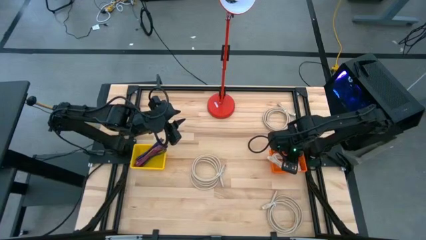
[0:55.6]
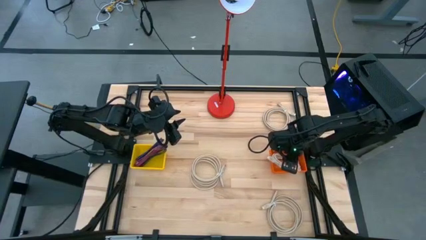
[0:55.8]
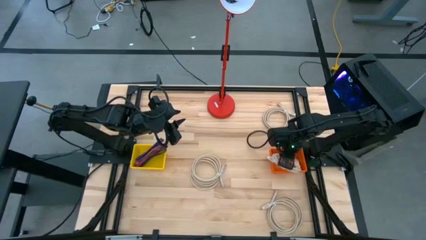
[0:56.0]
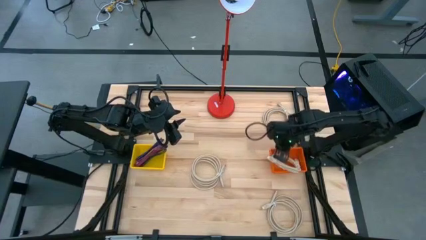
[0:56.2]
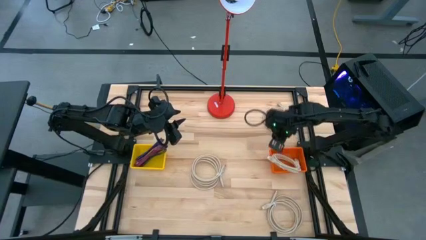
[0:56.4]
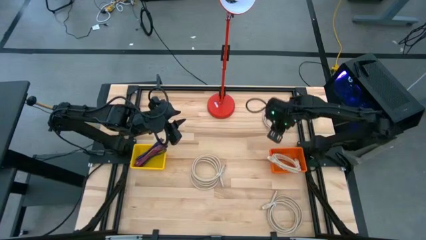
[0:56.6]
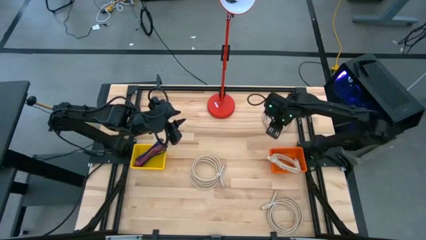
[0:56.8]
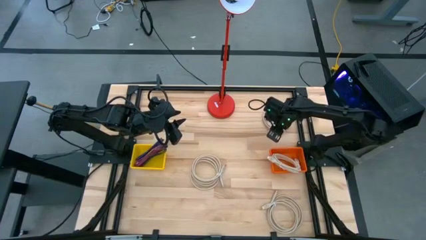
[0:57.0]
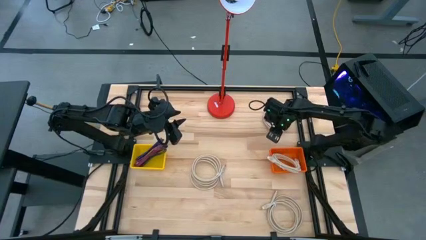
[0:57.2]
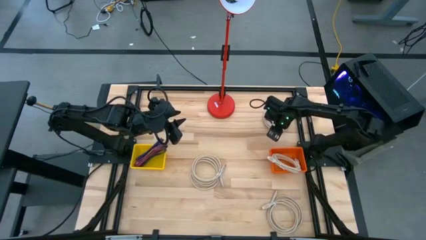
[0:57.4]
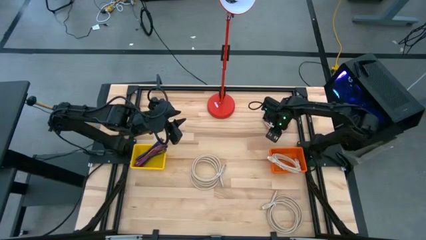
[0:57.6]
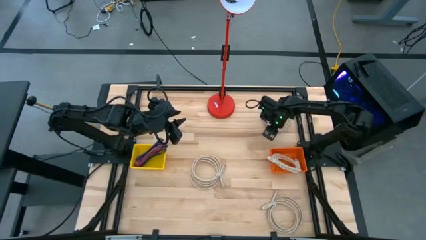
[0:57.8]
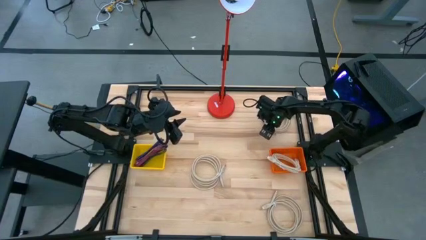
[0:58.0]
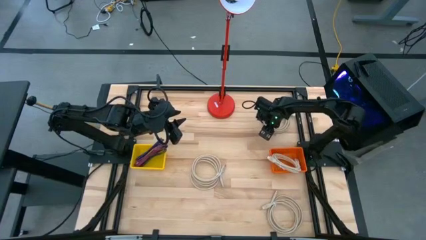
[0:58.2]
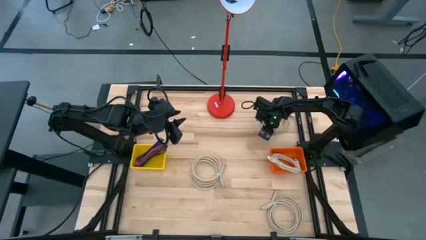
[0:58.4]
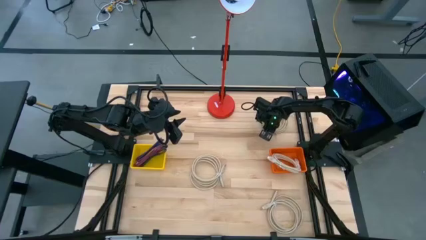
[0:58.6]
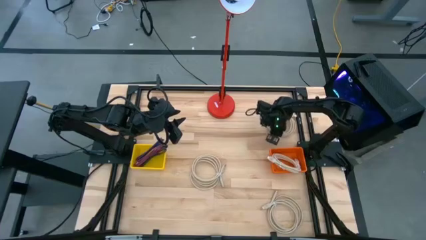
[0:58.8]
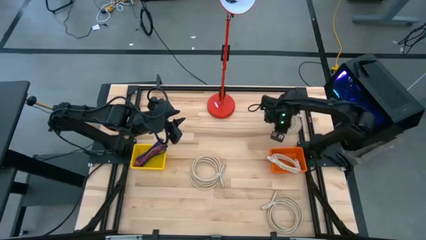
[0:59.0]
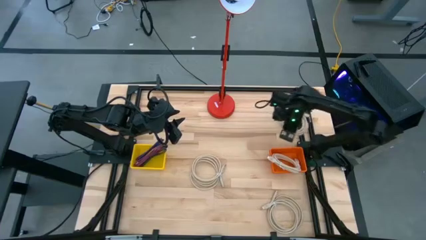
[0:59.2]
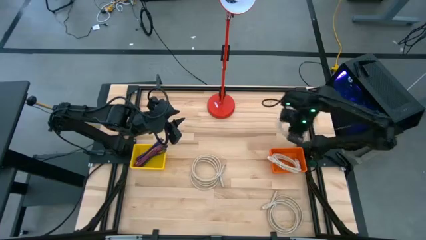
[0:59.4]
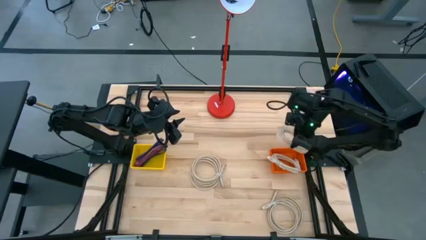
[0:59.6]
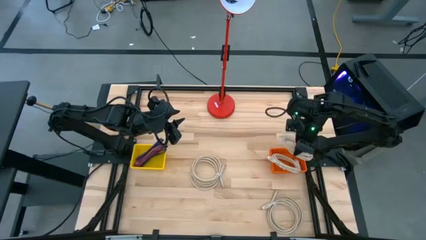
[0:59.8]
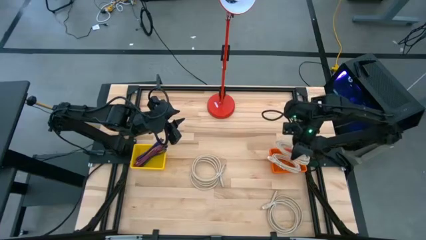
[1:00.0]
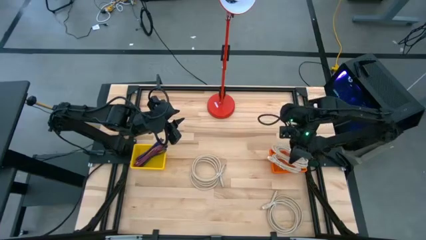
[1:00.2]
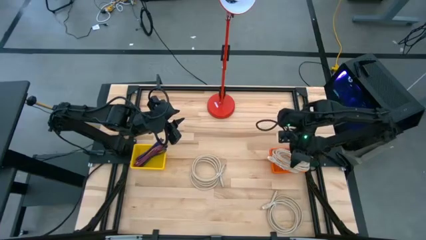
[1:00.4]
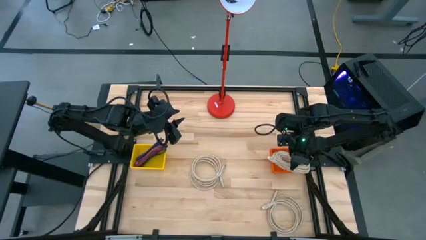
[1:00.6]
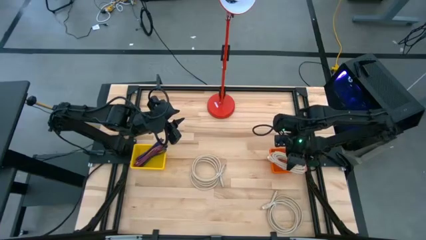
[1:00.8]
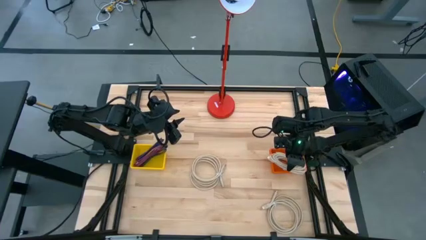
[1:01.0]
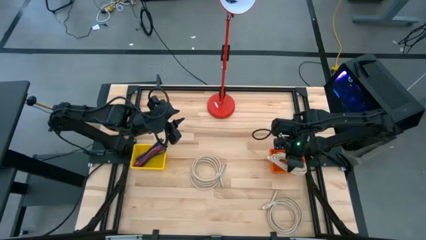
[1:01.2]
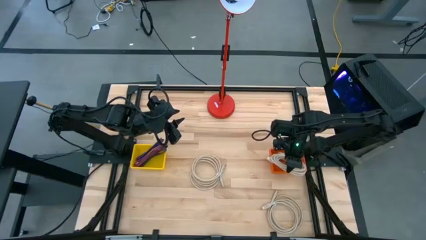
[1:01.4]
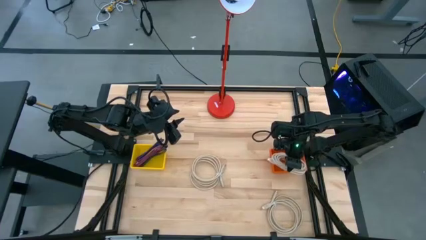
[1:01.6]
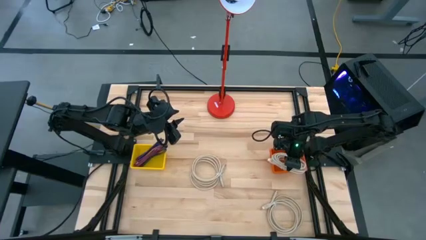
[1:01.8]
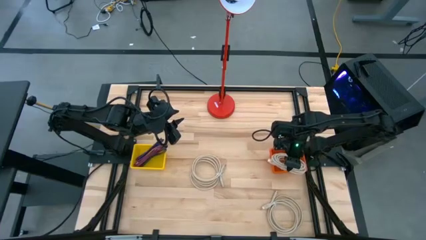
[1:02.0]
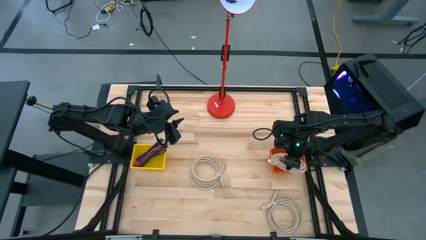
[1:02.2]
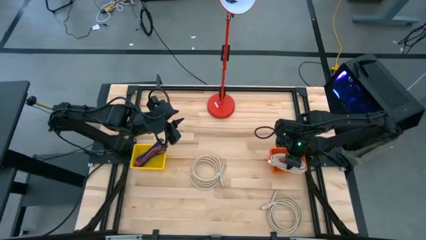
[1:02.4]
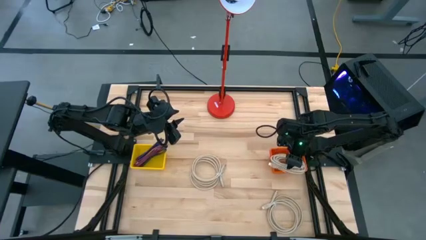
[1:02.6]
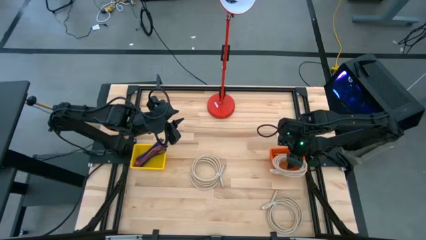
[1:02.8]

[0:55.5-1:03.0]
Task: Pick & Place USB Port
Put the brown HDMI cable into the orange bin

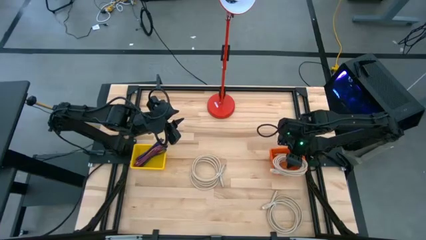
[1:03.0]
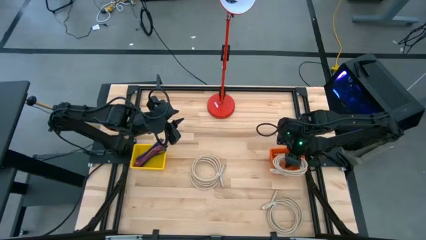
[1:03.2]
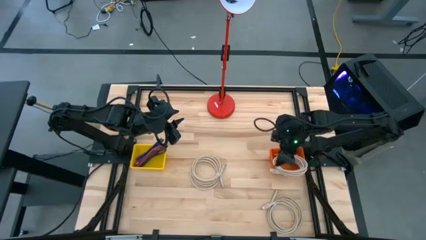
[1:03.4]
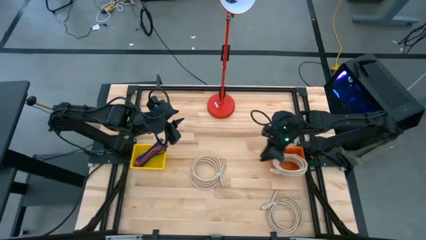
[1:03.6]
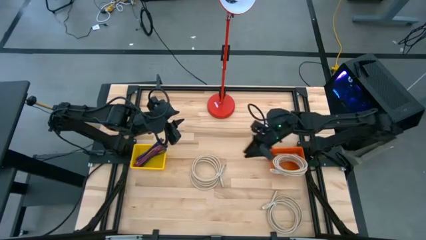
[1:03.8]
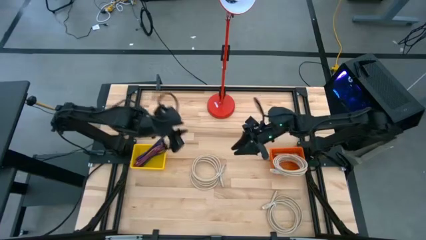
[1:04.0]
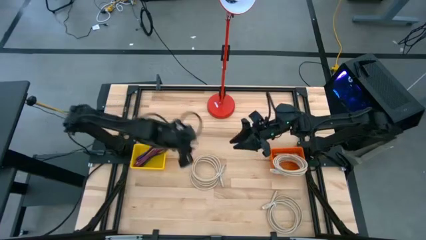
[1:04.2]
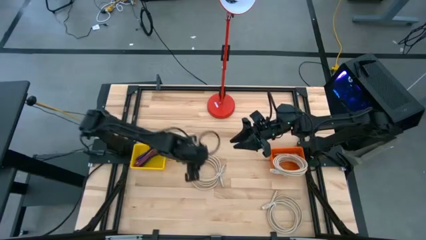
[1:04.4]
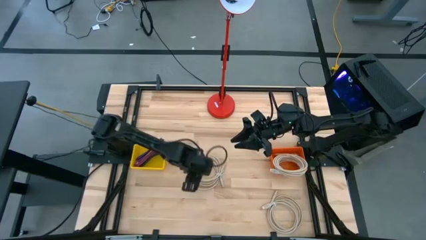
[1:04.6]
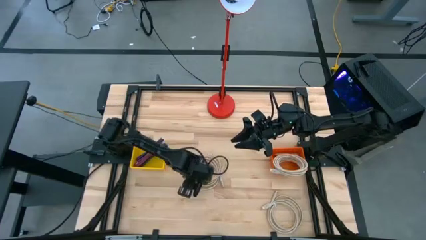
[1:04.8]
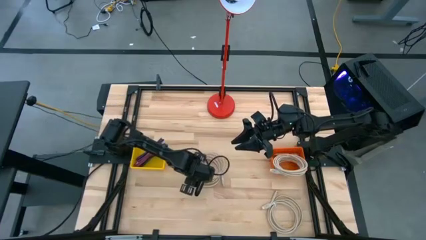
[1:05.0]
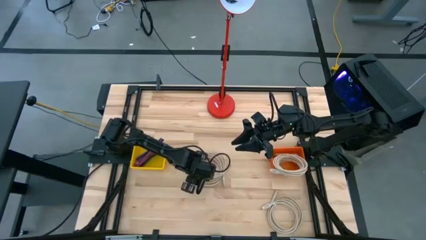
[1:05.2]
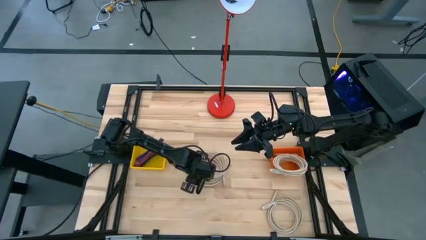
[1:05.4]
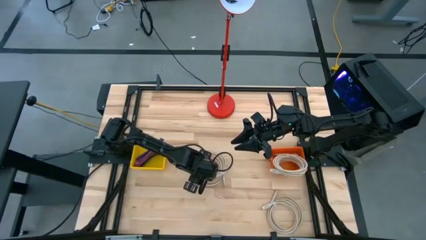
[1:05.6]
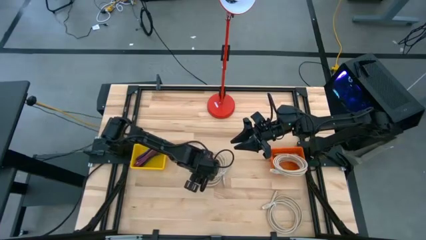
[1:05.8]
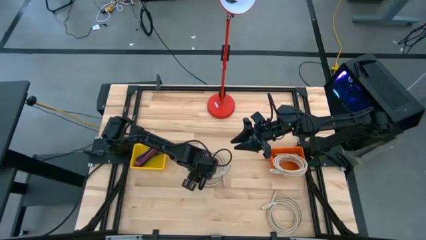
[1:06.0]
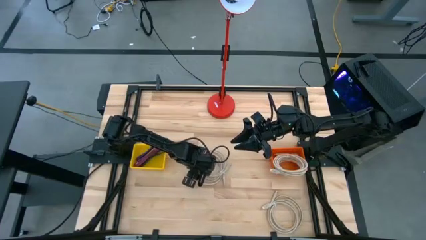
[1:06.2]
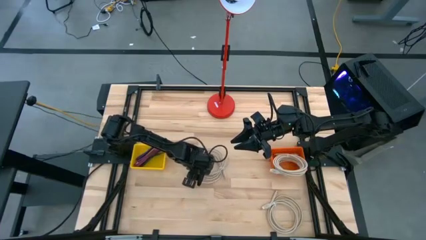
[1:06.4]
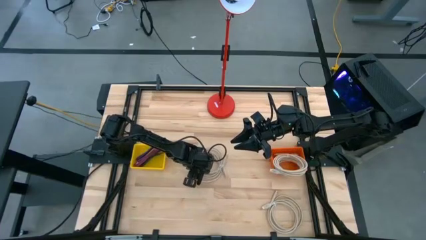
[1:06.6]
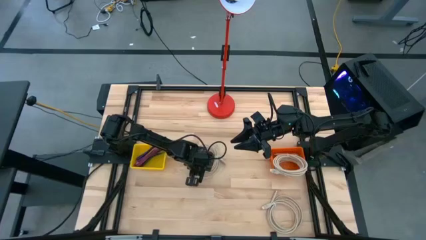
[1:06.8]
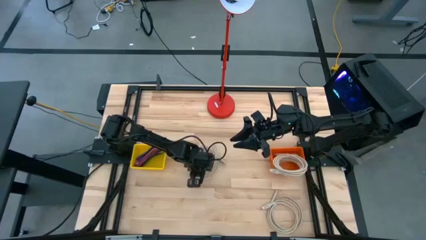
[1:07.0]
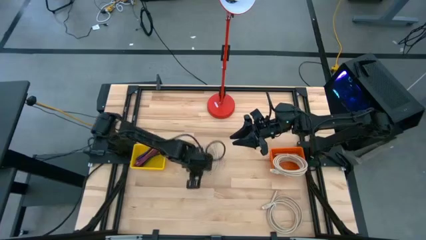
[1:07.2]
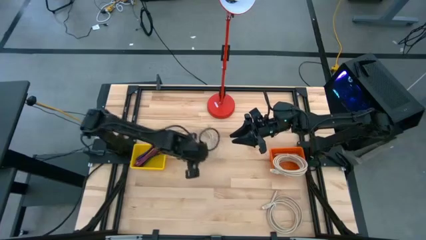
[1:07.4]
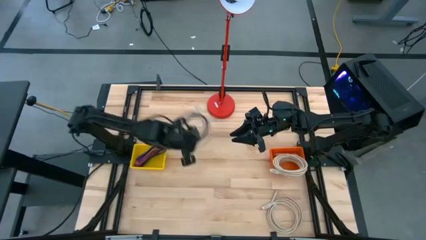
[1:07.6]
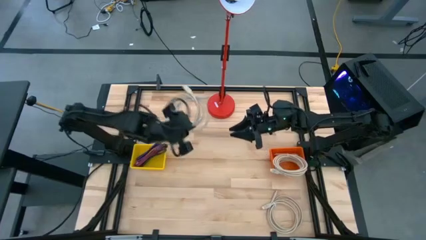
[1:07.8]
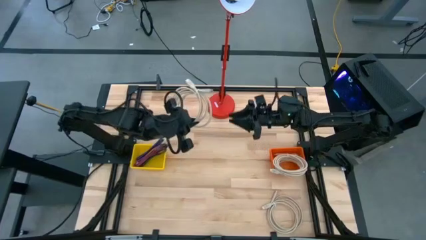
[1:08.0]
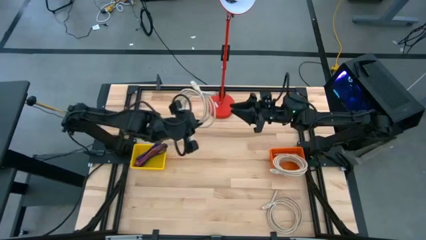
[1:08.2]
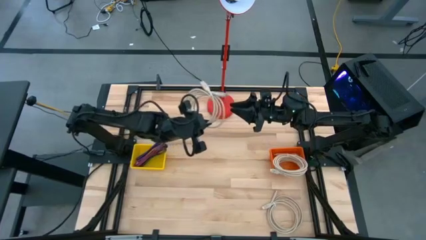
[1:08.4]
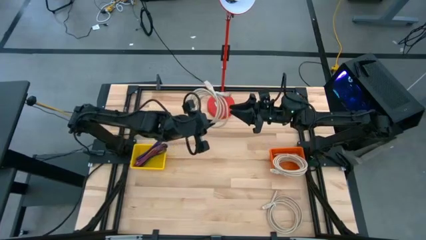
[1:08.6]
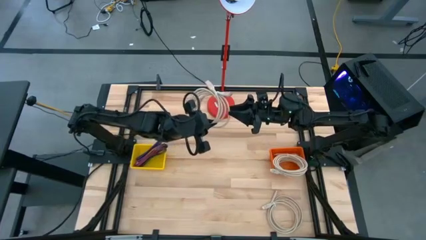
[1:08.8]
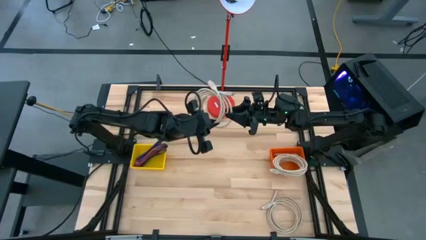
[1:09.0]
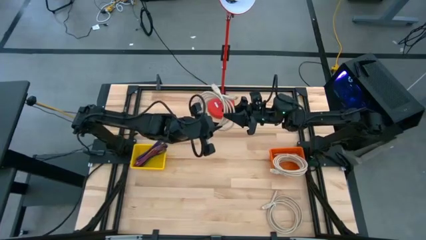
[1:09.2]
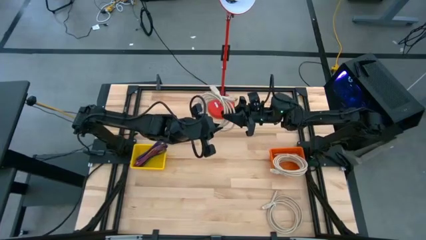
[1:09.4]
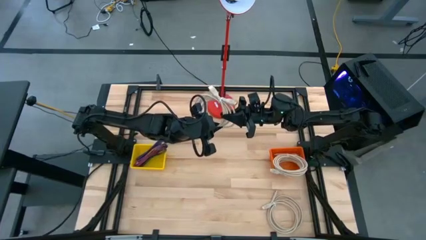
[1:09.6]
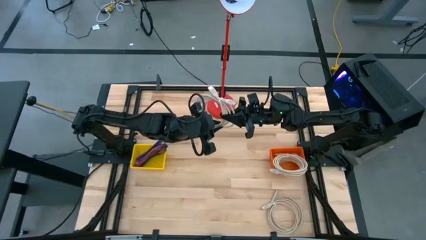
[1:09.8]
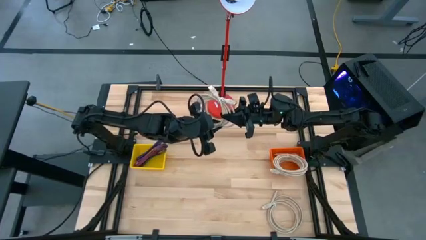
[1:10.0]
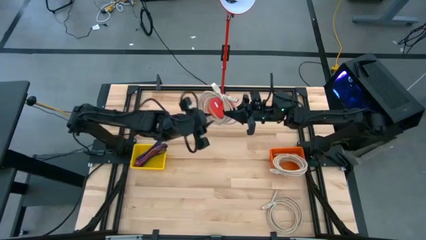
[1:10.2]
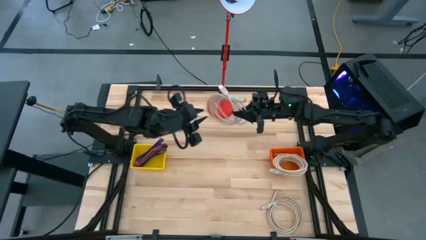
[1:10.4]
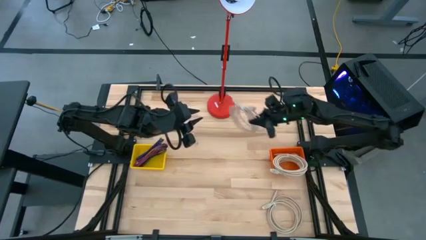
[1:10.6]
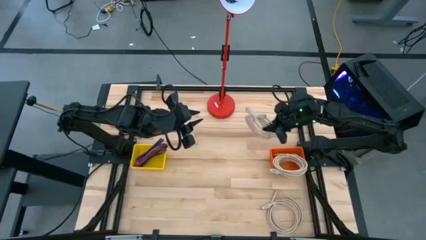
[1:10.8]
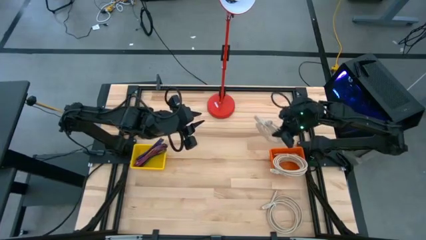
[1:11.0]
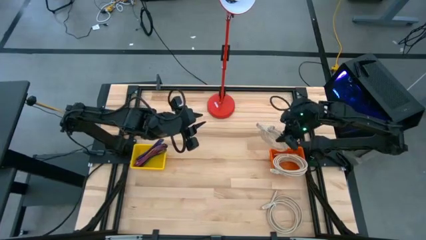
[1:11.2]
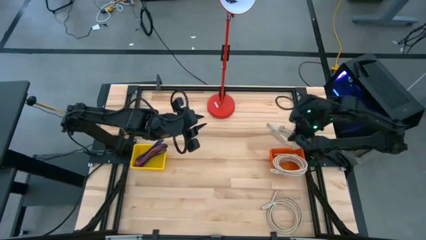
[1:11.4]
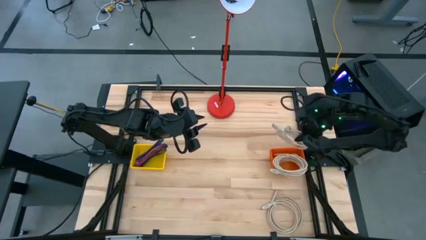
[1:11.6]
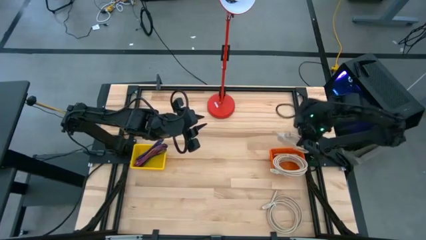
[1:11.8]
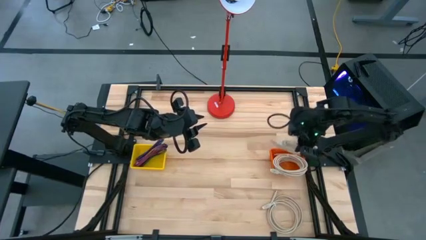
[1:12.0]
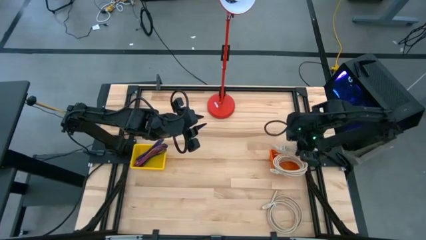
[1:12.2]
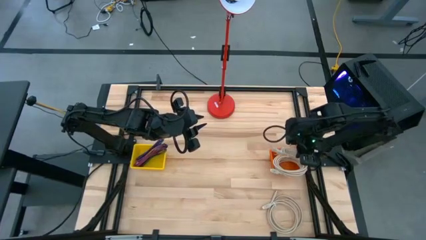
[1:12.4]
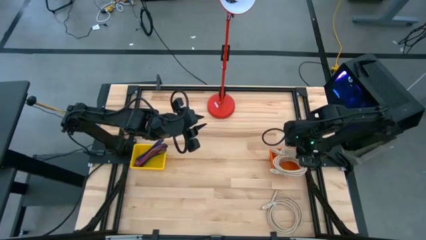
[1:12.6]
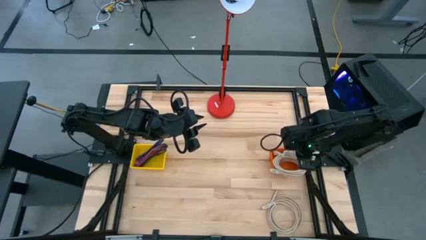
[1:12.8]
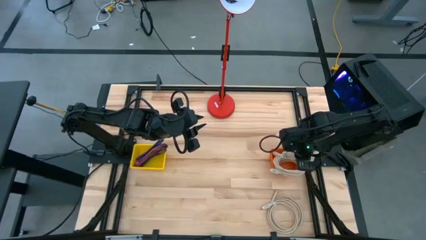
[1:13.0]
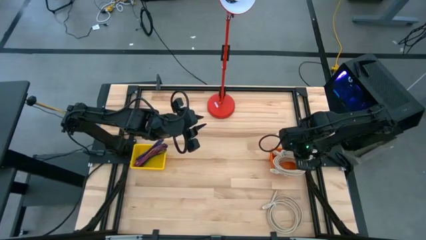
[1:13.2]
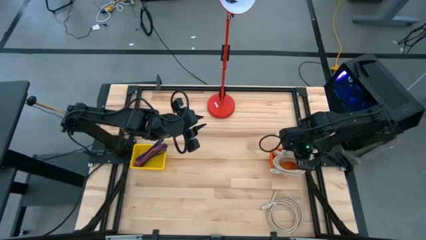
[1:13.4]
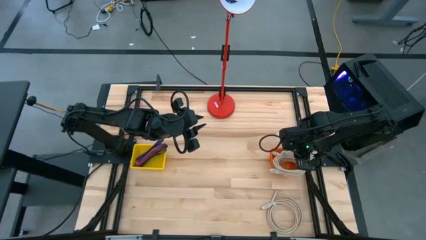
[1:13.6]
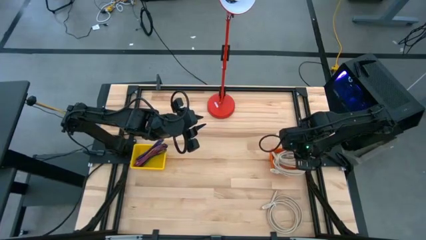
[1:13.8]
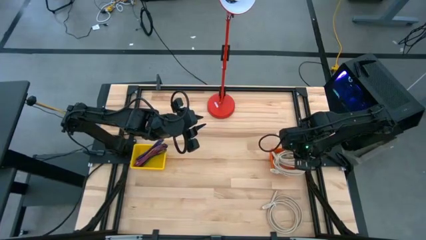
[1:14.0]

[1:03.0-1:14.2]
Put the brown HDMI cable into the orange bin
